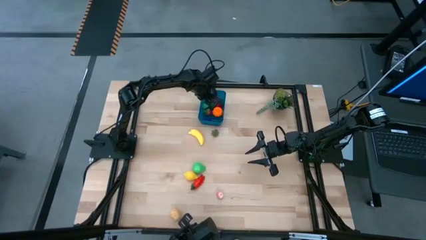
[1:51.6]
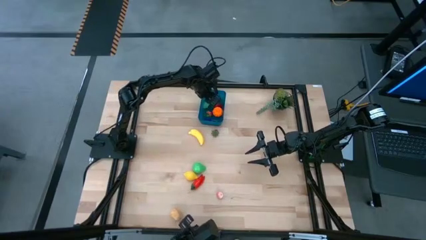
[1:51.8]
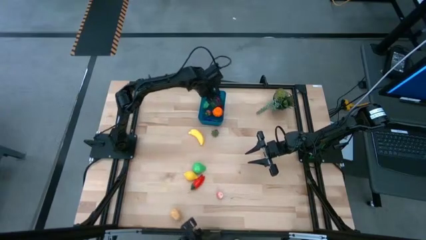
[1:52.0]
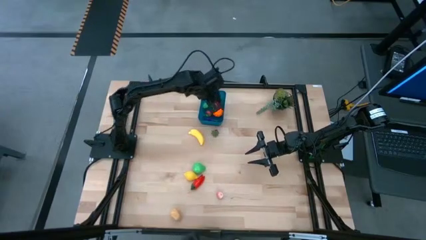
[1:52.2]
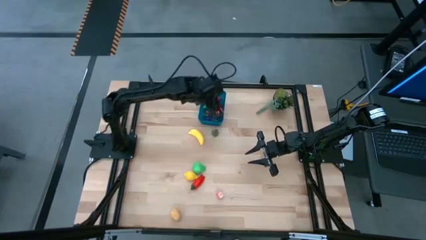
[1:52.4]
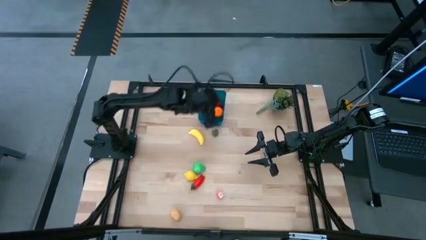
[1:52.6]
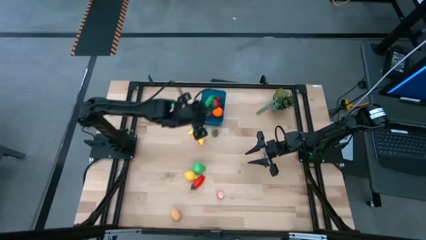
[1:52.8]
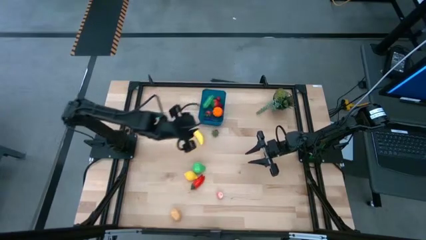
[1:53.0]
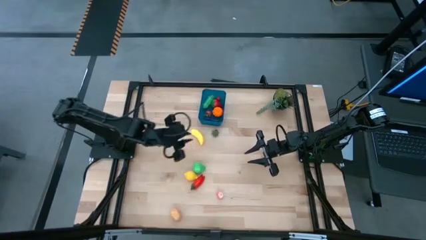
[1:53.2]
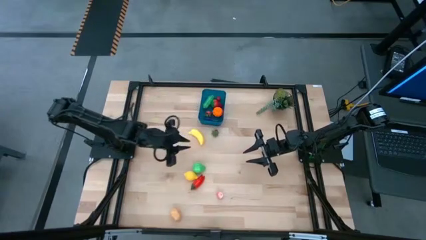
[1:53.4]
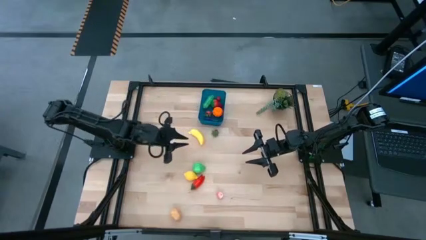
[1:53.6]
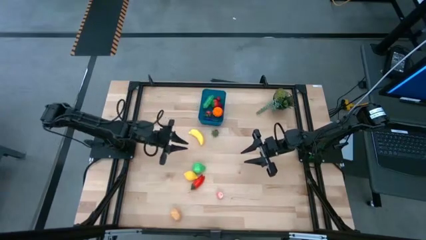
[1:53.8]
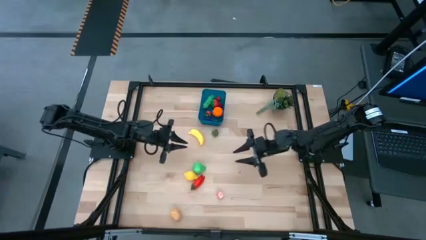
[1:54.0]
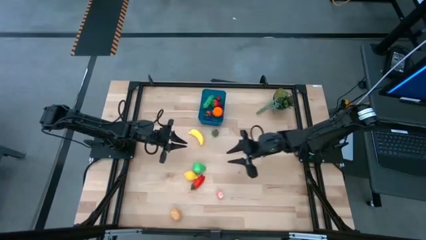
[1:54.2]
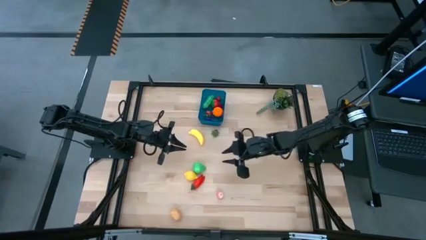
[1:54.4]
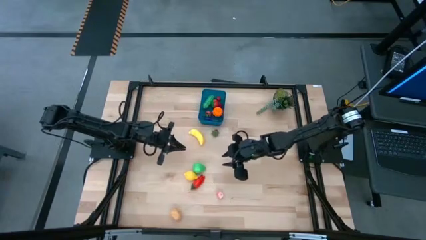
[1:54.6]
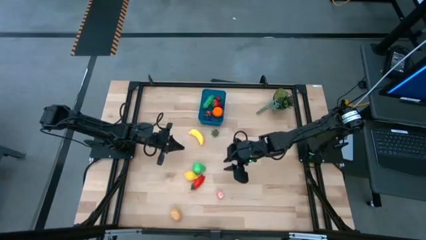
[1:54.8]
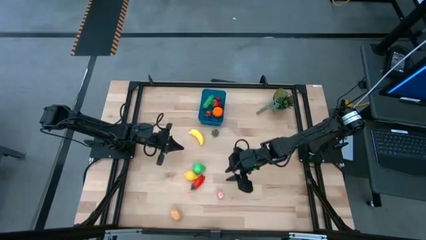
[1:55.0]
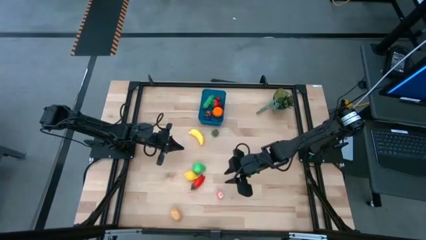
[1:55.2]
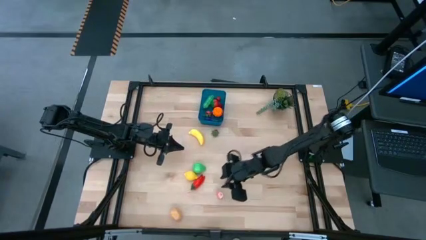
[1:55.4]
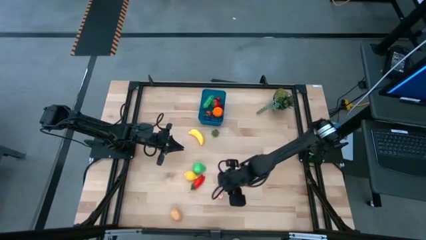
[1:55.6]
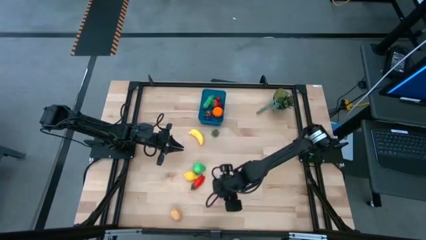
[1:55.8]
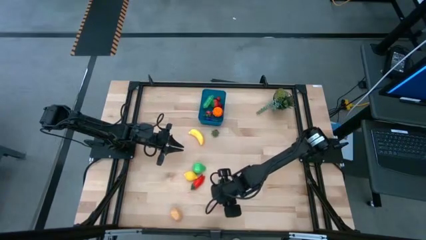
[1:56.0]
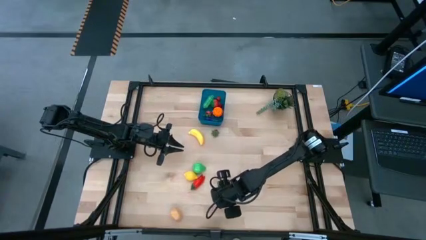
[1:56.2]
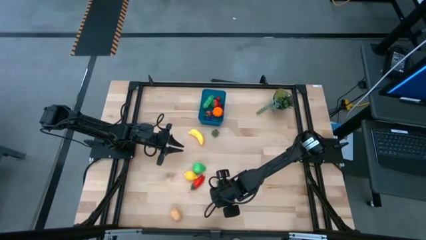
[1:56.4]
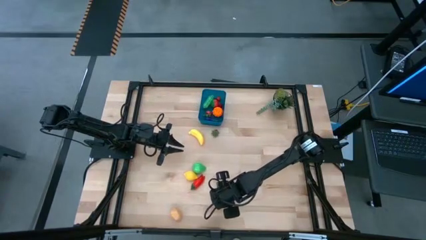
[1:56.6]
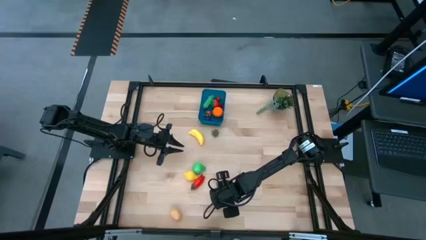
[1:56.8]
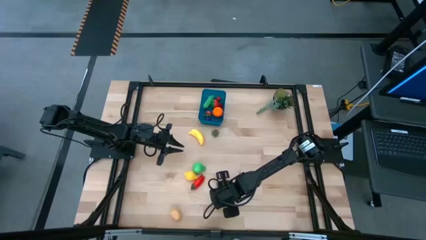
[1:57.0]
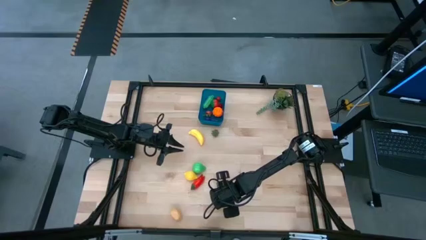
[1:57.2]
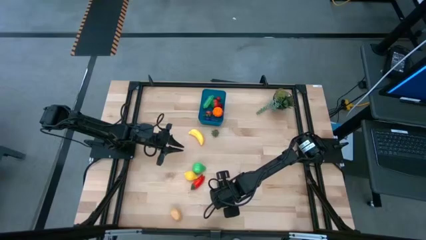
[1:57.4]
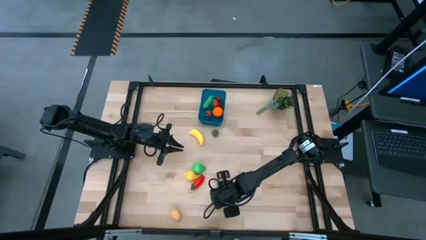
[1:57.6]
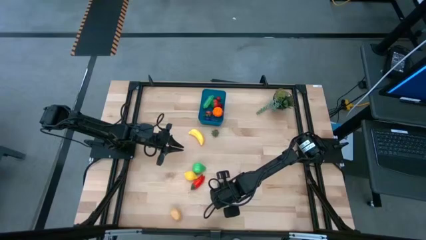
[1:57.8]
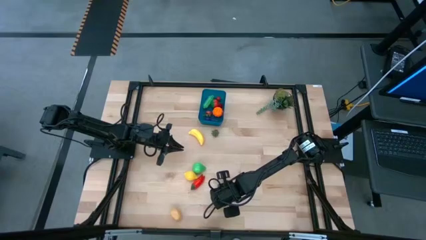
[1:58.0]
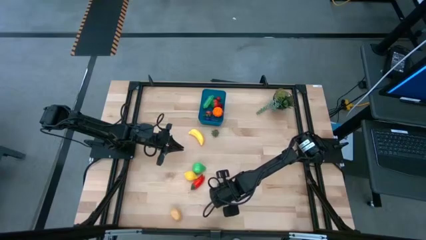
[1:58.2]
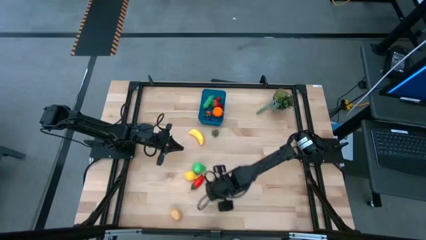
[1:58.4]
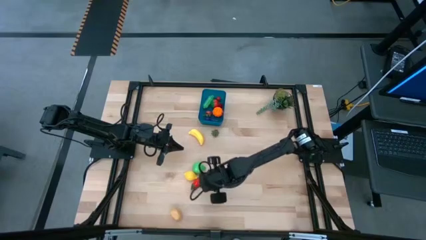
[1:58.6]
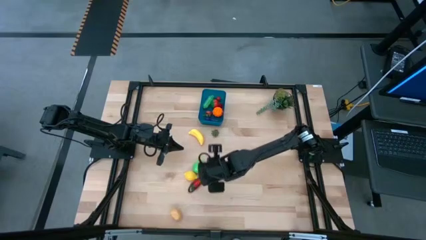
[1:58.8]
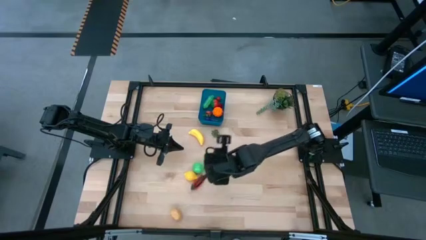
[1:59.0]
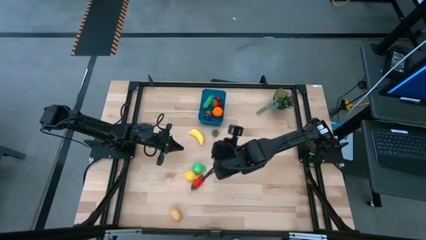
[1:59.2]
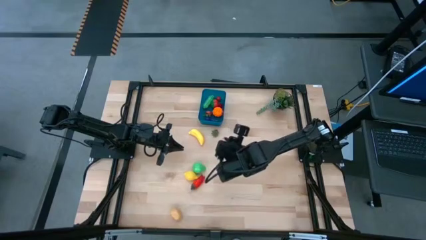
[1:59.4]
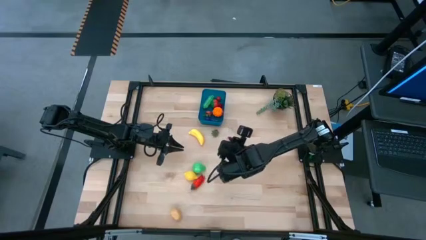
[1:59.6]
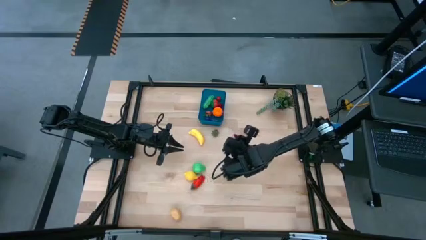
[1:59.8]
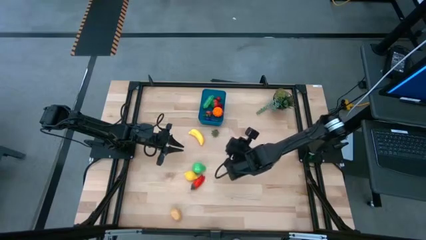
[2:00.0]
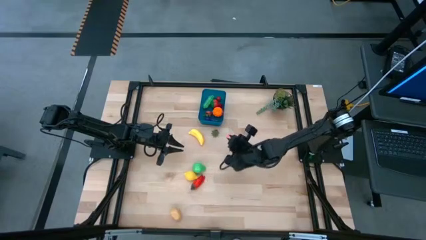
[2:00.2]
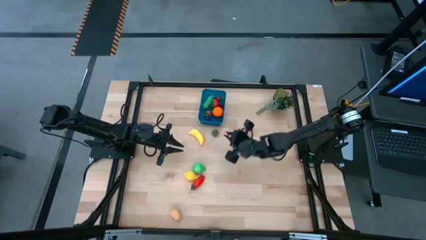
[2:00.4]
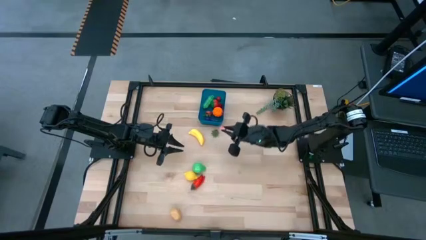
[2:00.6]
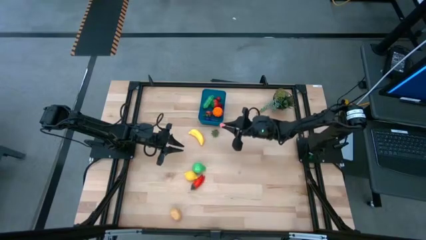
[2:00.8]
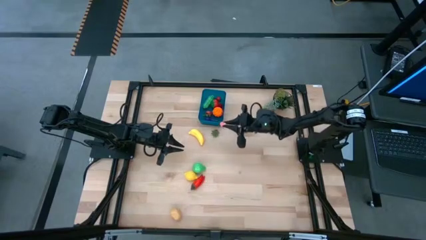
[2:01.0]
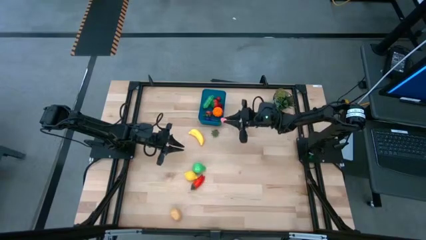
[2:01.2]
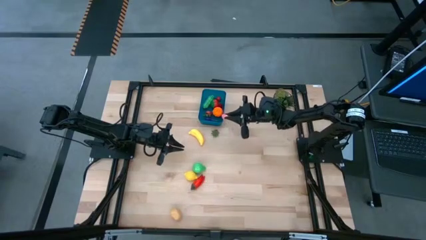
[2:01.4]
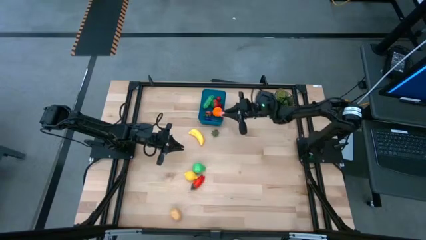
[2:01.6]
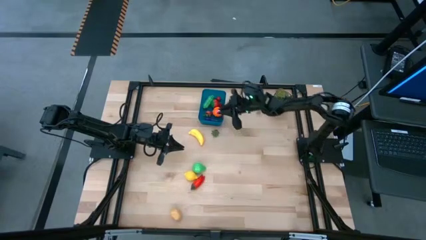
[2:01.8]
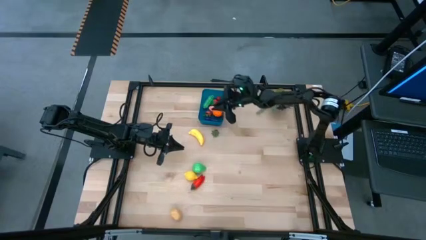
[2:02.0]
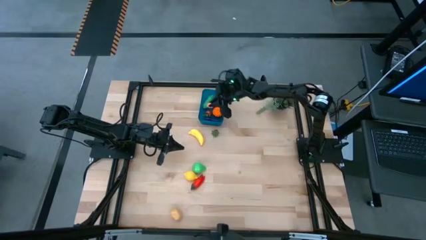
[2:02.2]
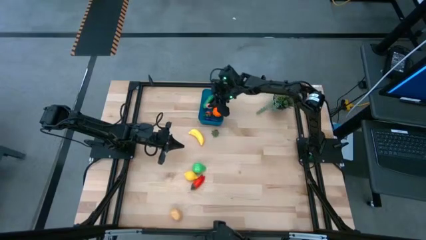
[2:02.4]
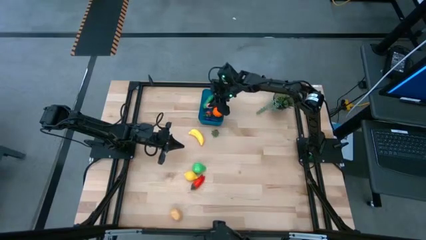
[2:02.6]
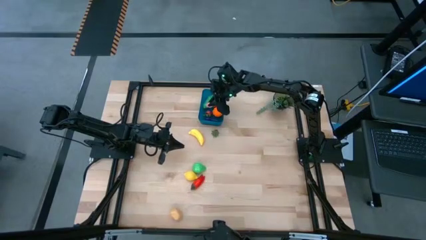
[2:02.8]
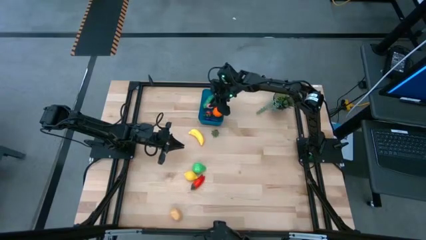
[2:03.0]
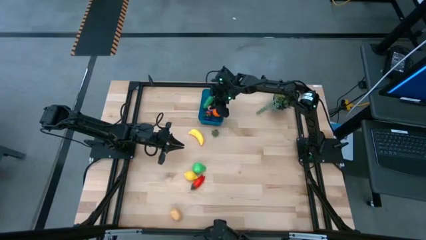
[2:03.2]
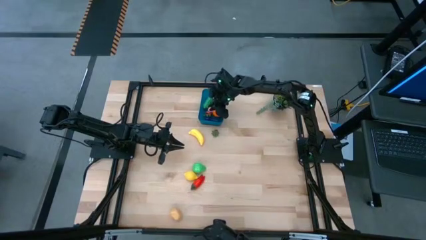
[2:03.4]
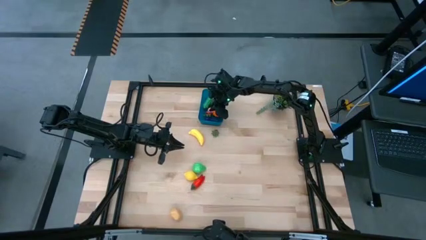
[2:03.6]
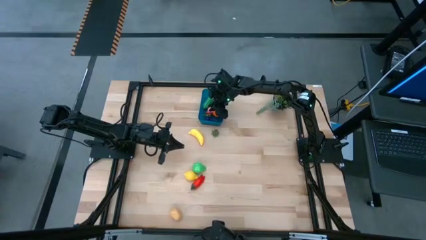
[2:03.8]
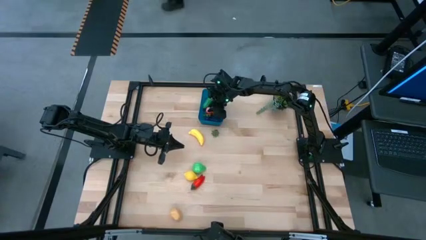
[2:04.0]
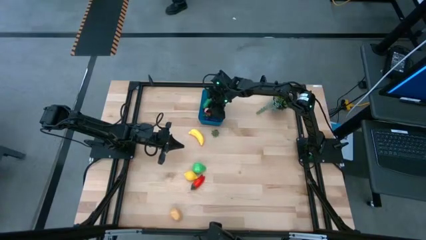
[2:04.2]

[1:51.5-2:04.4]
Task: Pick and placing Produce into tupperware
Put the apricot into the blue bin

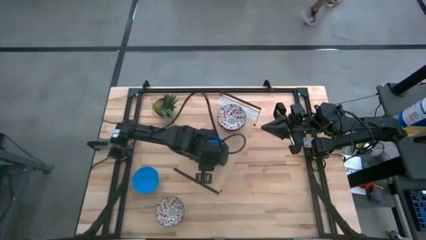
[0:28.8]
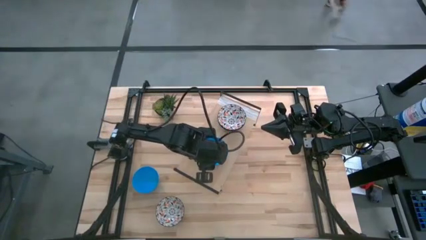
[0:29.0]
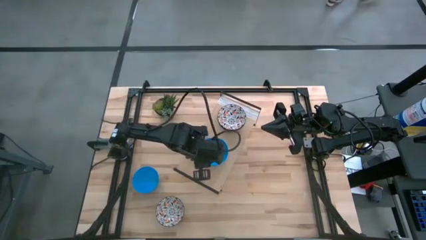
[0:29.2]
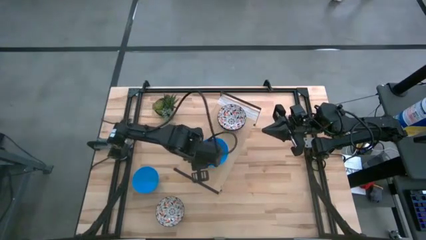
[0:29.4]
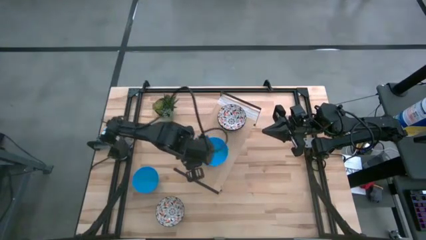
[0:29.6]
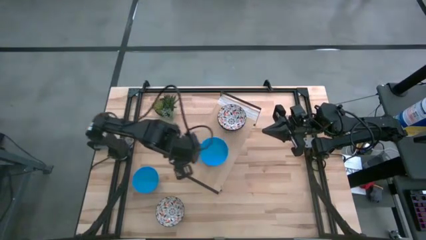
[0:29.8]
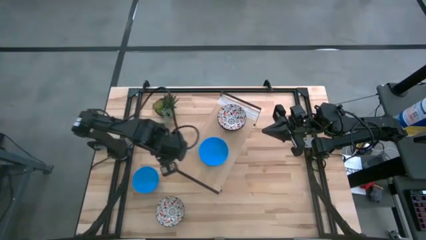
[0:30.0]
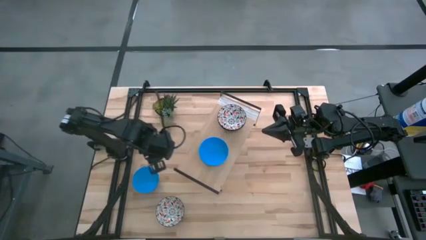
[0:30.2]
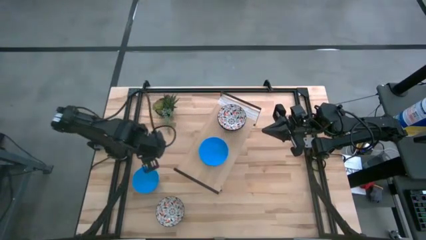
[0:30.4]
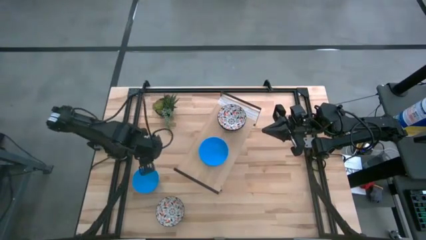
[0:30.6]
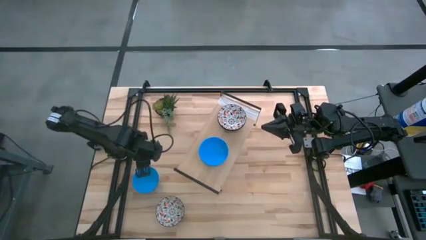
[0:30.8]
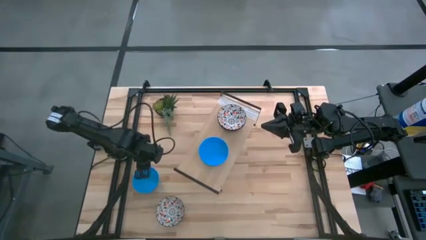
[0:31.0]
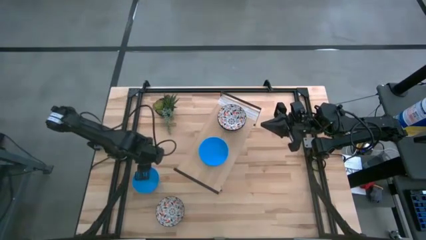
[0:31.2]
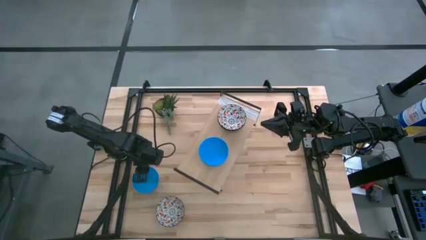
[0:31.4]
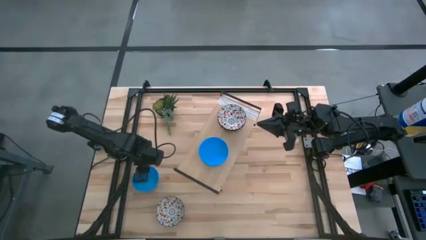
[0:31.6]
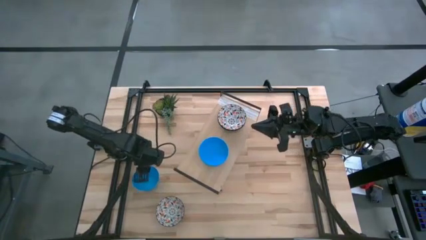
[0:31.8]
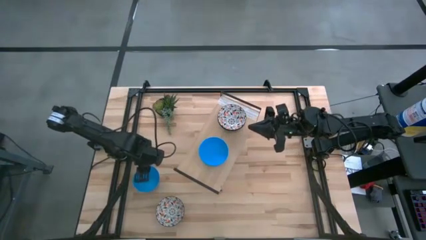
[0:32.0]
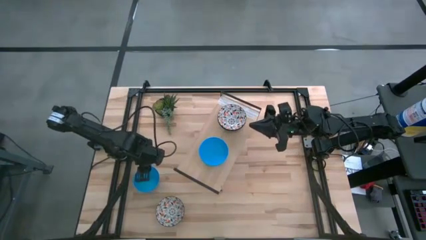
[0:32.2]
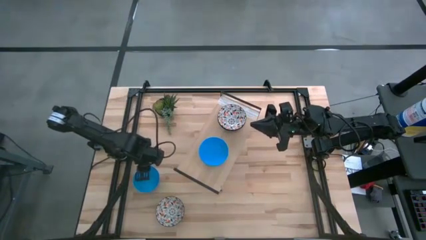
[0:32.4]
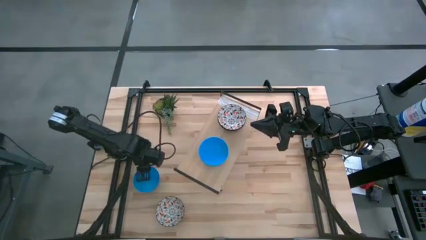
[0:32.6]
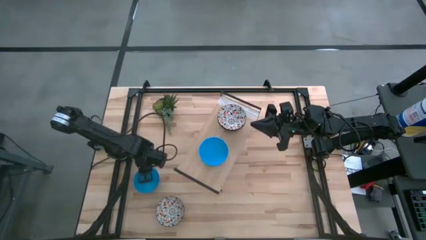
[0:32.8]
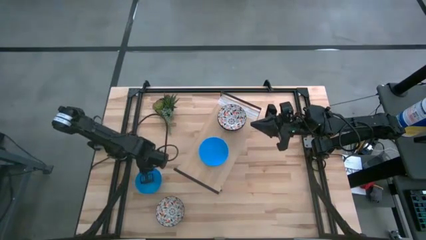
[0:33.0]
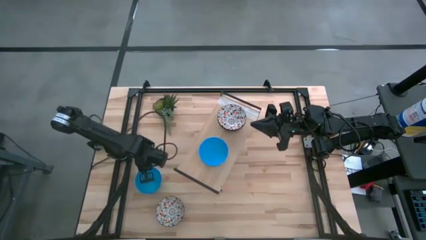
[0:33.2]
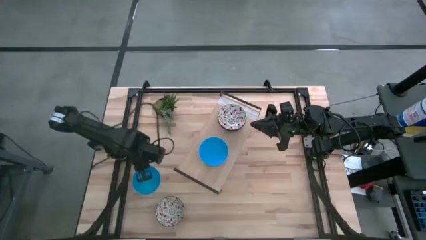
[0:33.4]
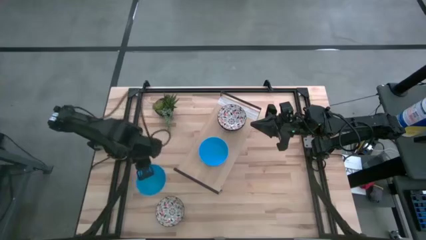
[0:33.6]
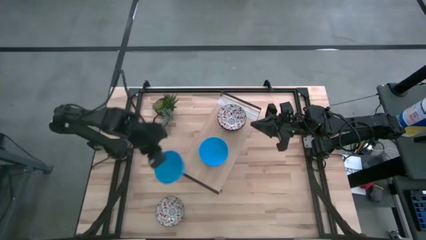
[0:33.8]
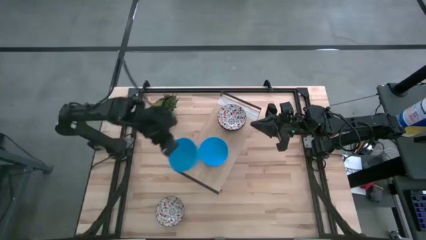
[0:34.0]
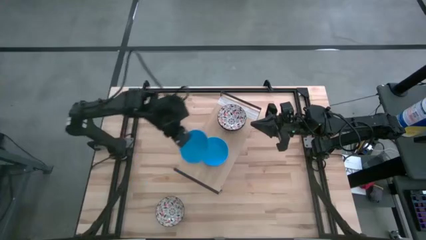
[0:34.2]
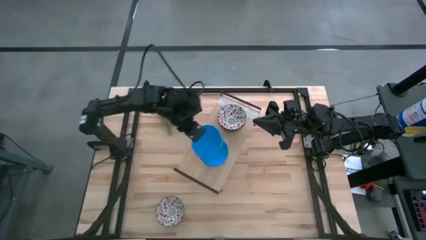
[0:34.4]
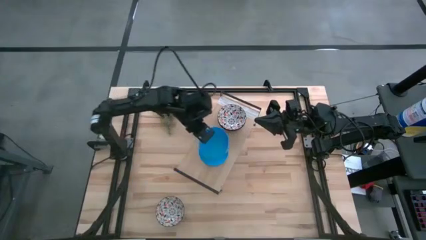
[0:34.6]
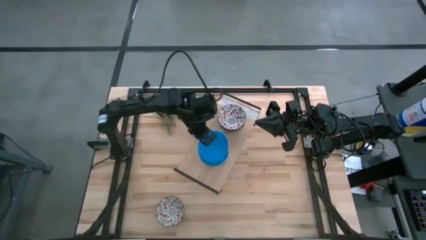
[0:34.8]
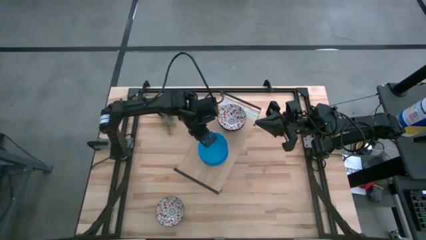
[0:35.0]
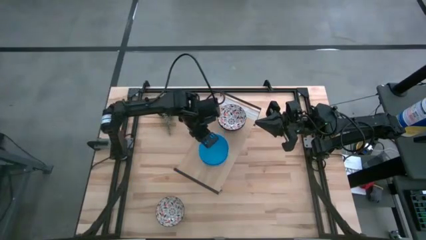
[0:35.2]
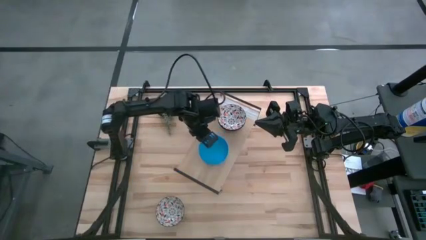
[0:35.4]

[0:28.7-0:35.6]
Task: Pick & Place Mini bowls
Stack the blue bowl on the blue bowl on the shelf
